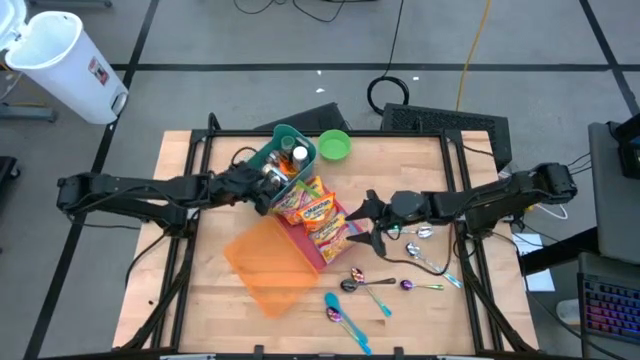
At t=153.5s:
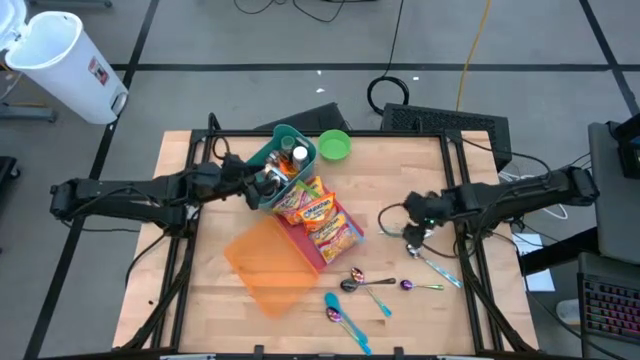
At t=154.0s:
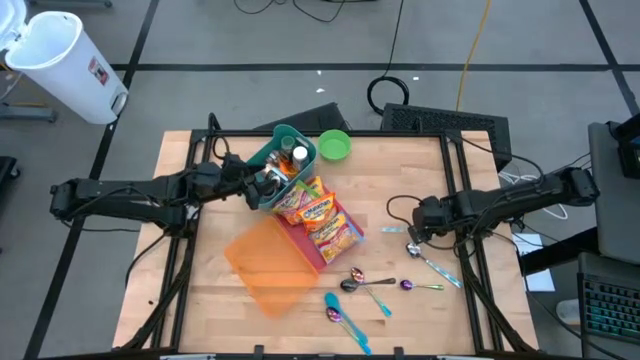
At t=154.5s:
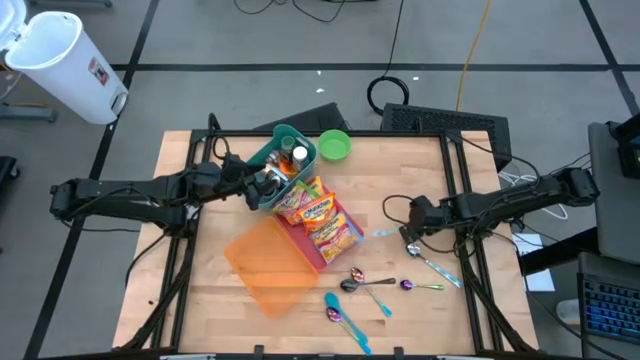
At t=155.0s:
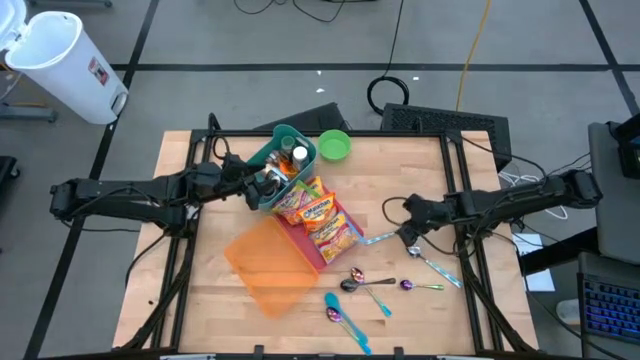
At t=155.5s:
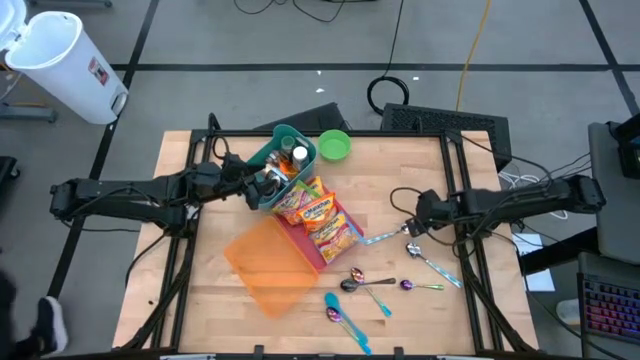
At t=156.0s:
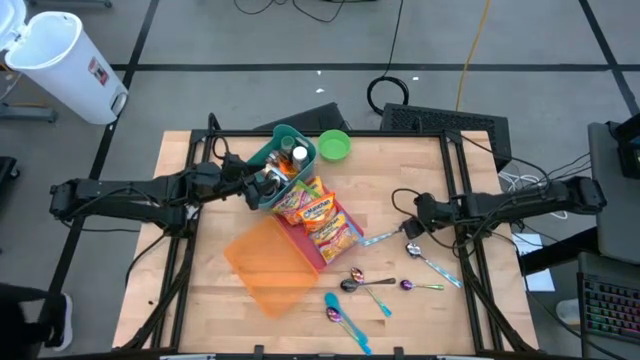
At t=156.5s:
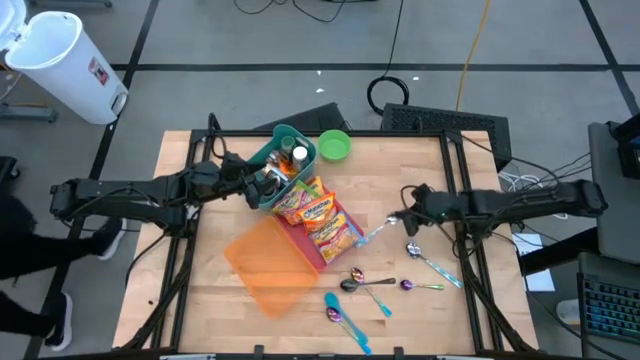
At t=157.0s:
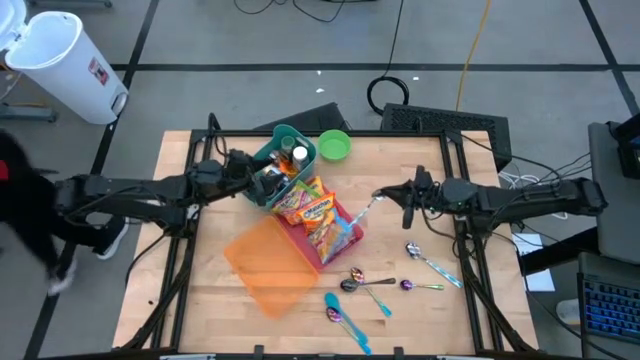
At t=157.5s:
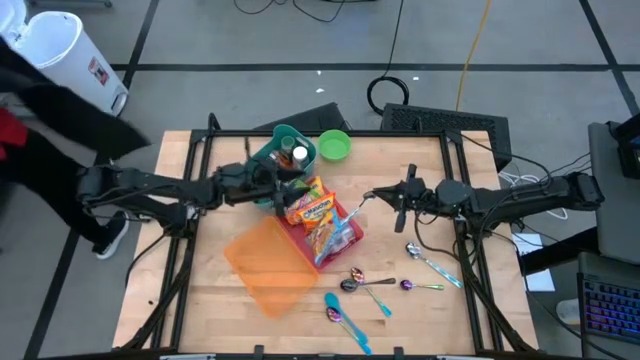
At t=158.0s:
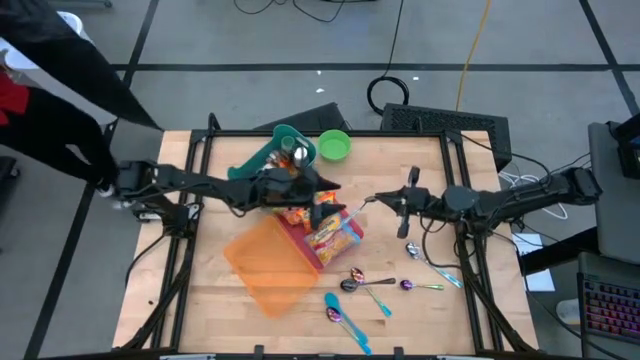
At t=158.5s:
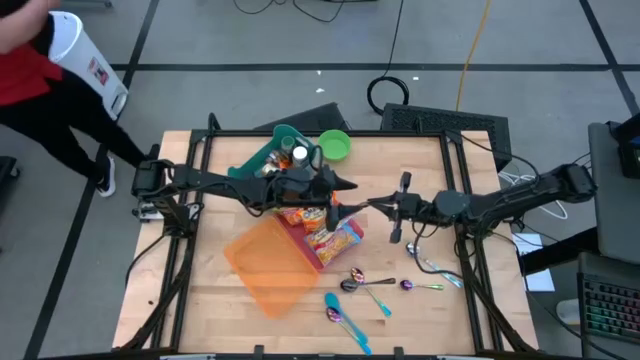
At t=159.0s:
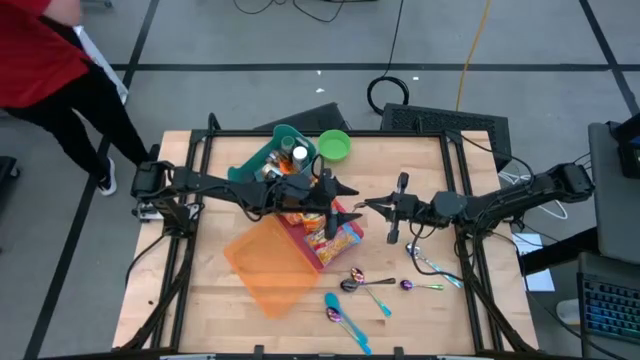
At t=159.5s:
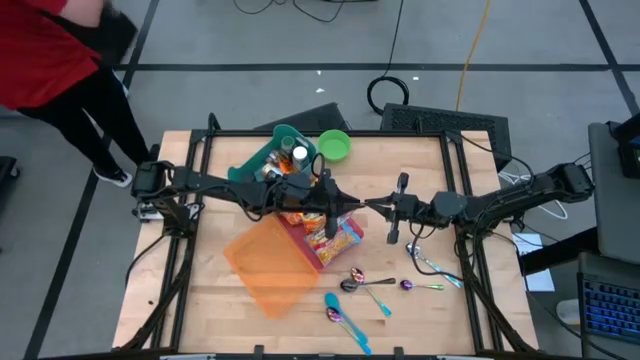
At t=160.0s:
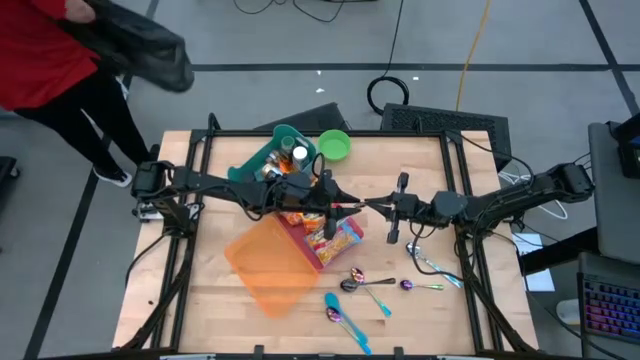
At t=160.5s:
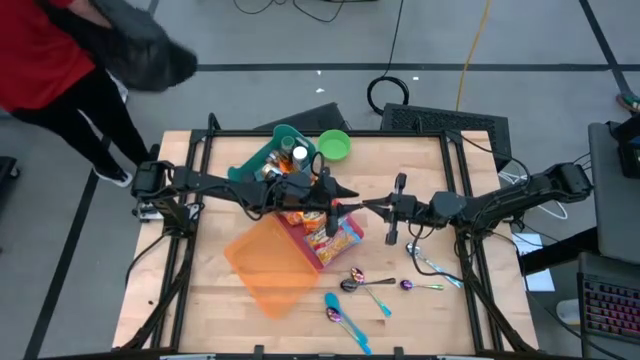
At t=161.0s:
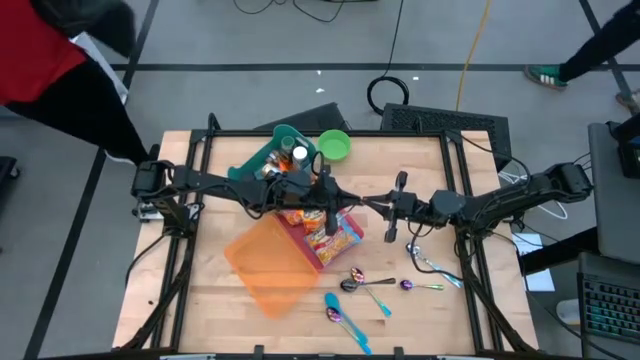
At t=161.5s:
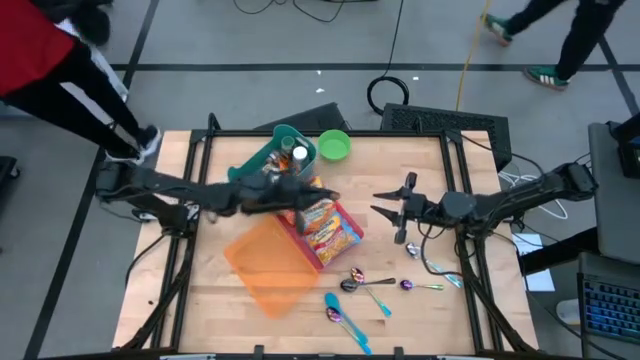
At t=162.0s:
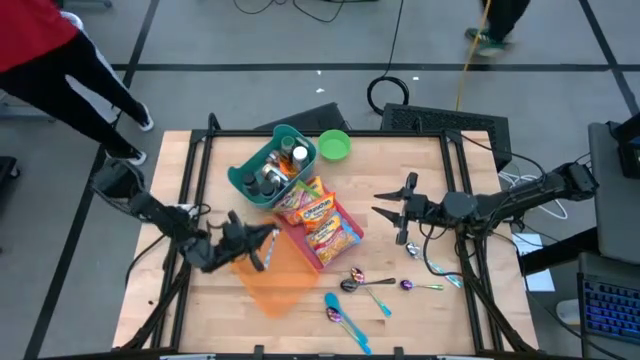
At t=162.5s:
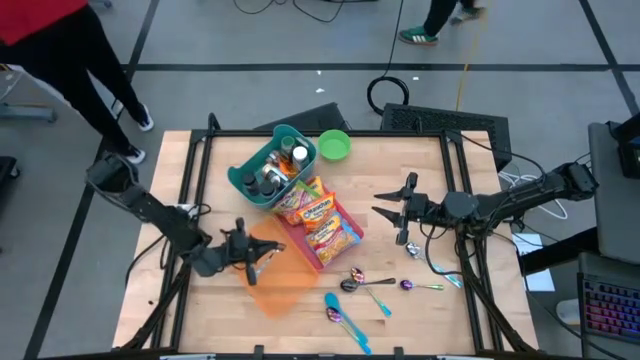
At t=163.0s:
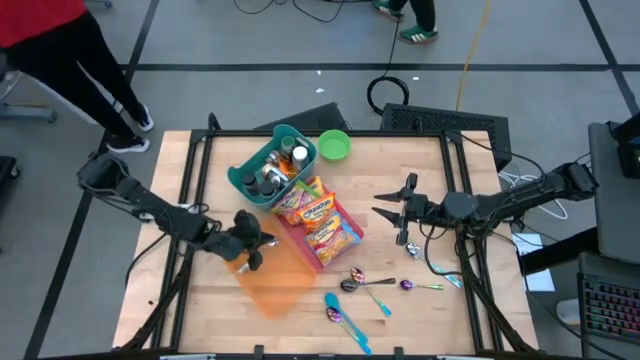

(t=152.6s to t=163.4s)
Task: Pick & Place Food Item
Put the top white blue spoon into the orange bin

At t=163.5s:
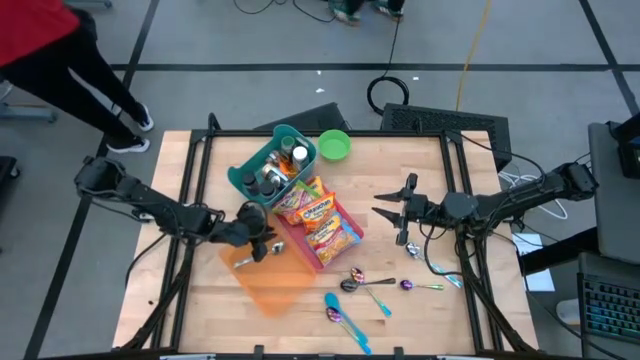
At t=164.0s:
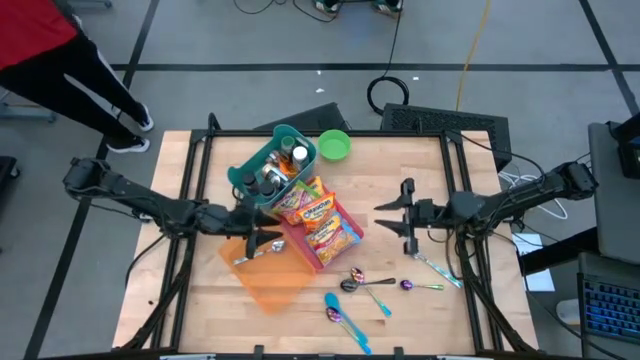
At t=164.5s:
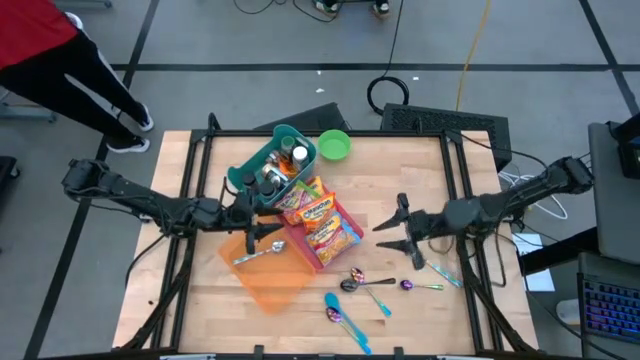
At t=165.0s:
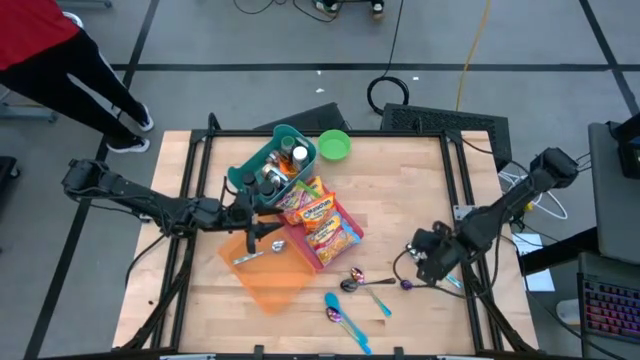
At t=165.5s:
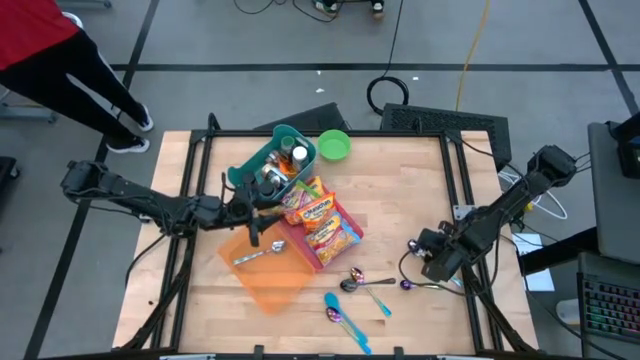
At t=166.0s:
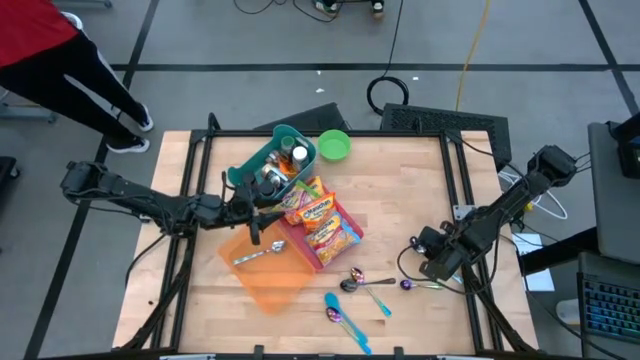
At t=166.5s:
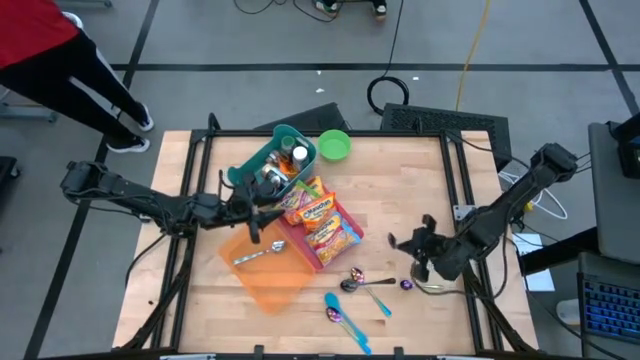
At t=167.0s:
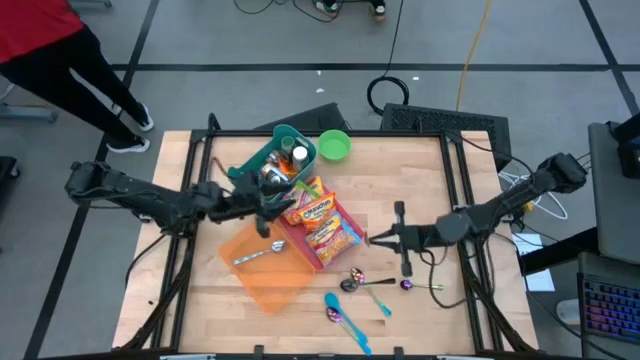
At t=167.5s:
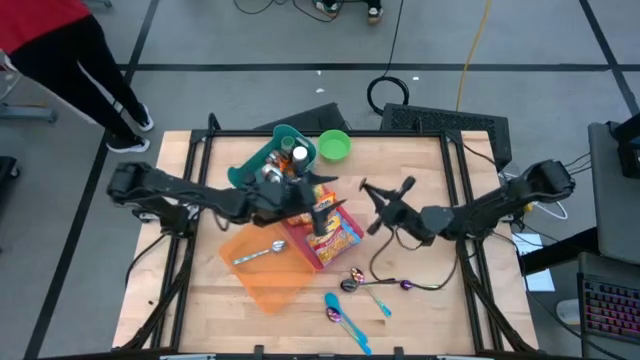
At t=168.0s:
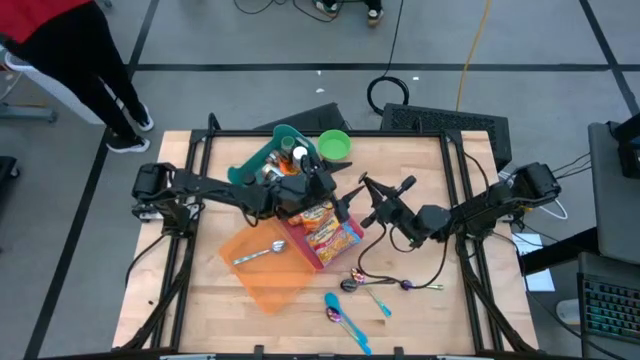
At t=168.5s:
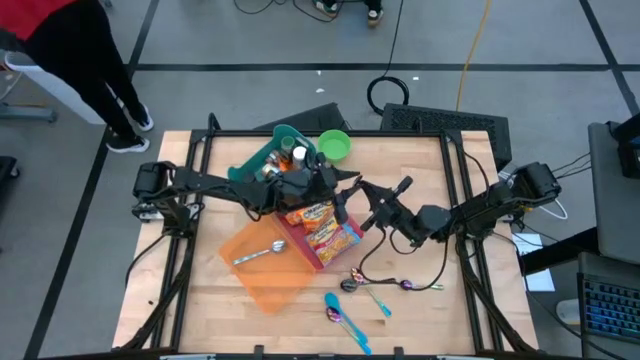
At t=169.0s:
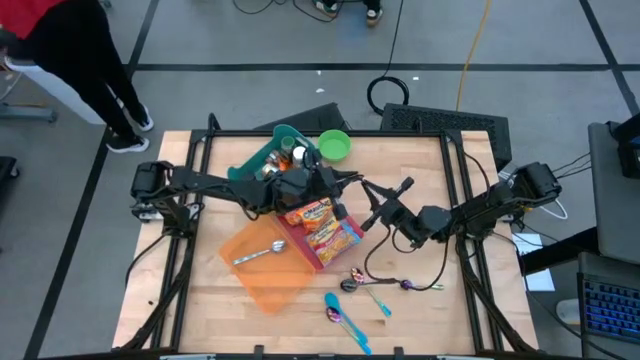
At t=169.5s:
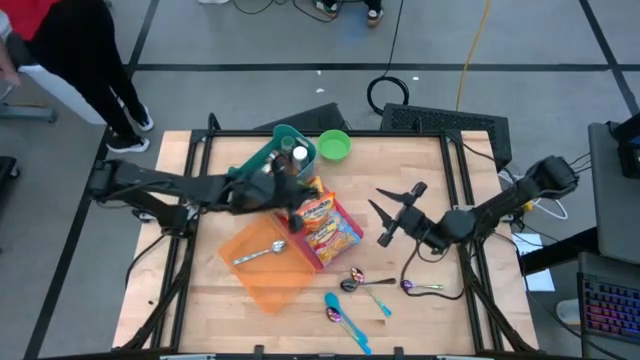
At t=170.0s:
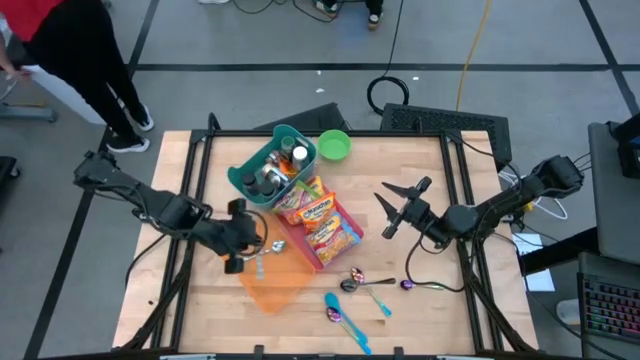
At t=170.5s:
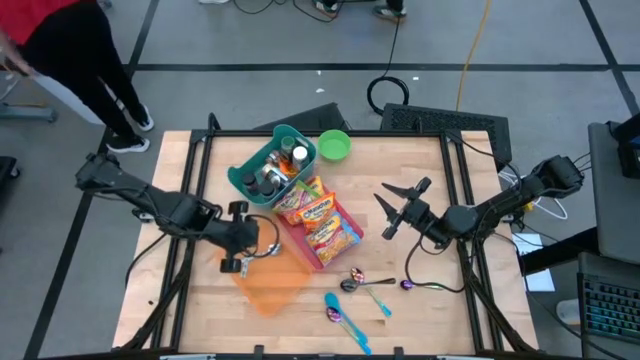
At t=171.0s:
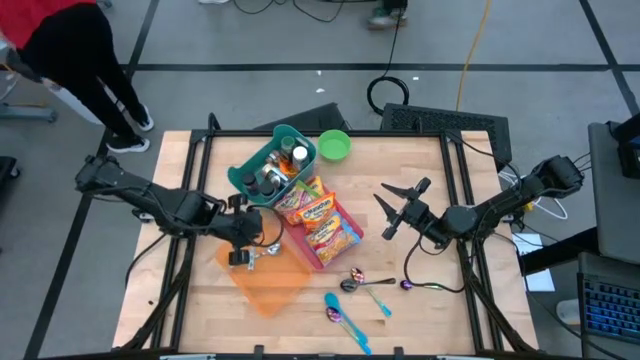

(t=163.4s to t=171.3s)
Put the white blue spoon into the orange bin
